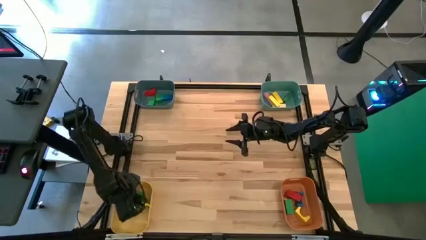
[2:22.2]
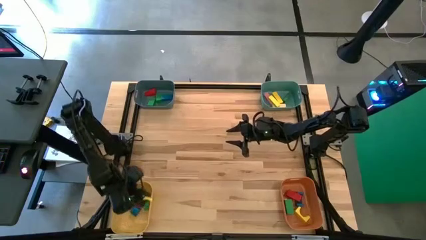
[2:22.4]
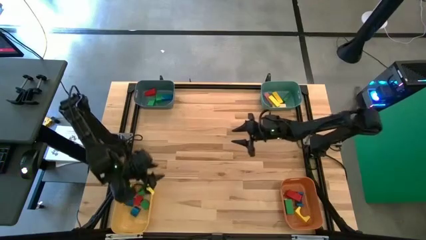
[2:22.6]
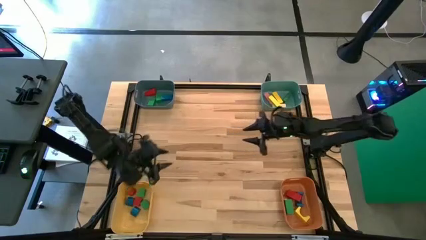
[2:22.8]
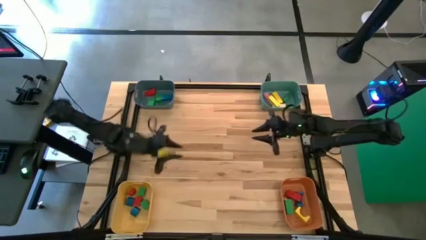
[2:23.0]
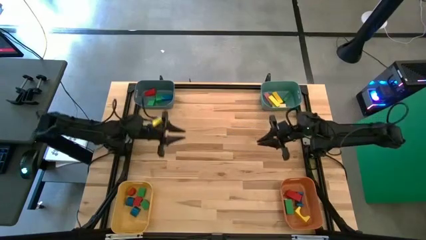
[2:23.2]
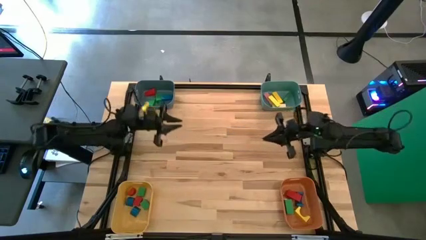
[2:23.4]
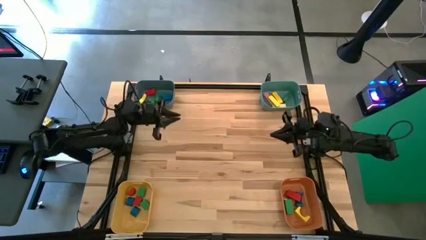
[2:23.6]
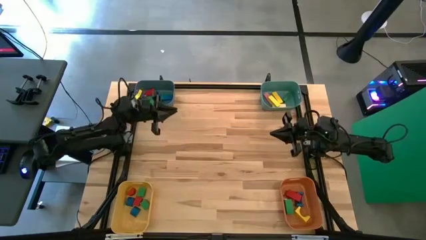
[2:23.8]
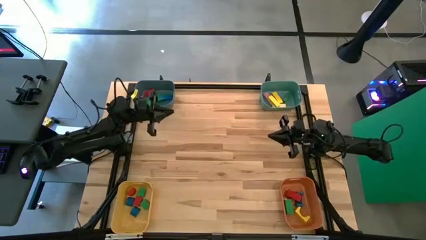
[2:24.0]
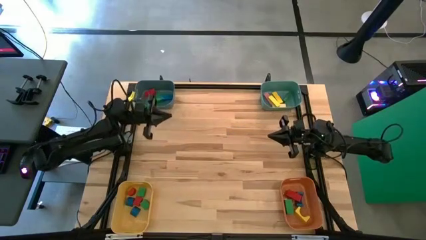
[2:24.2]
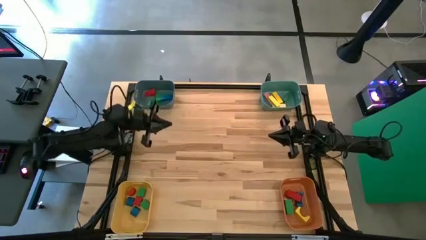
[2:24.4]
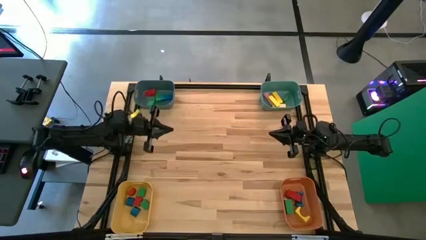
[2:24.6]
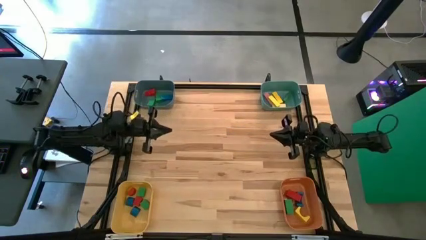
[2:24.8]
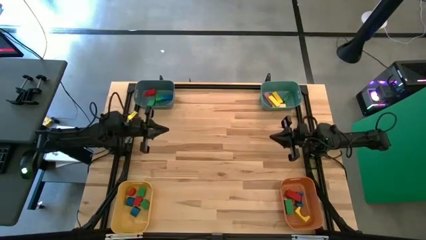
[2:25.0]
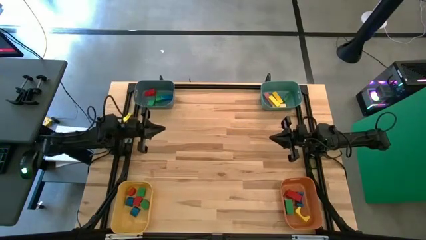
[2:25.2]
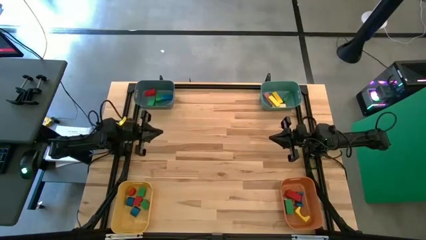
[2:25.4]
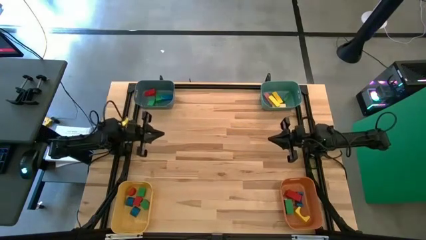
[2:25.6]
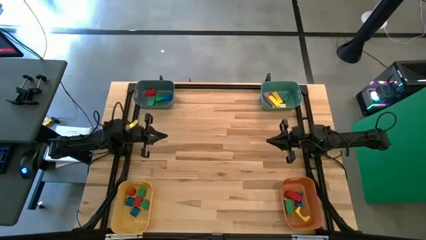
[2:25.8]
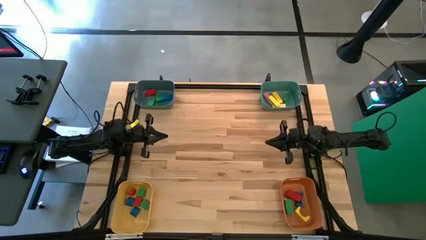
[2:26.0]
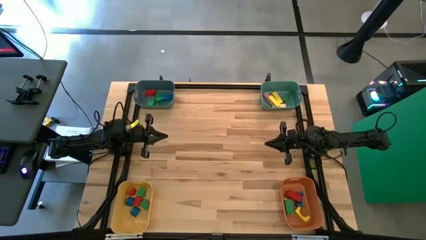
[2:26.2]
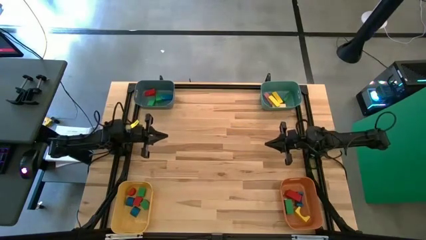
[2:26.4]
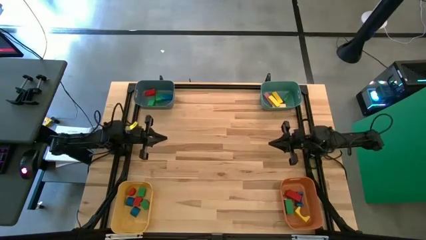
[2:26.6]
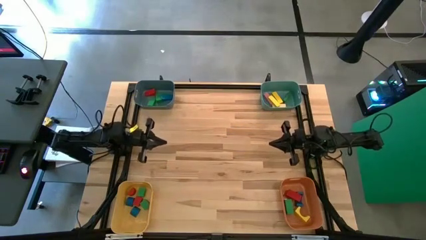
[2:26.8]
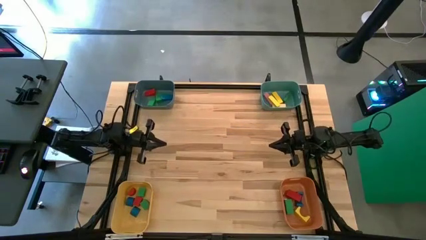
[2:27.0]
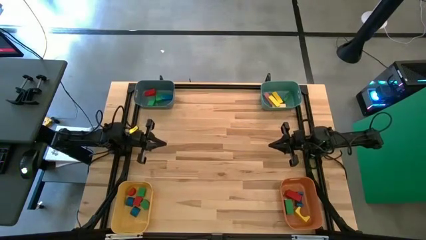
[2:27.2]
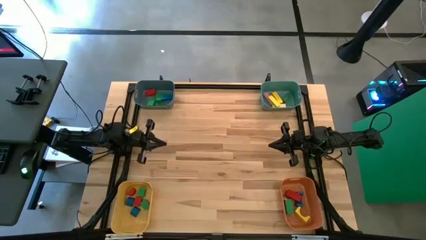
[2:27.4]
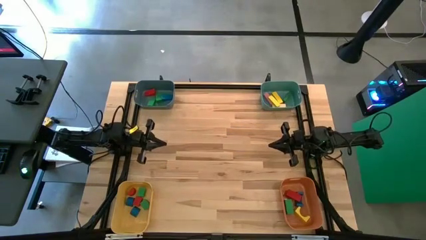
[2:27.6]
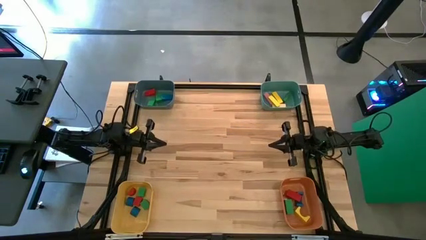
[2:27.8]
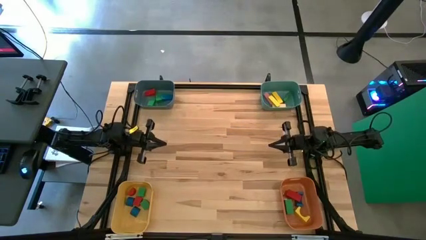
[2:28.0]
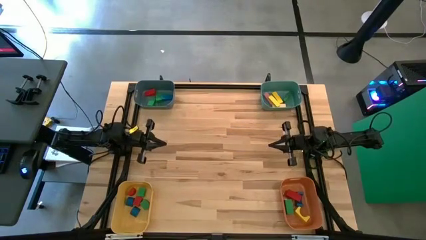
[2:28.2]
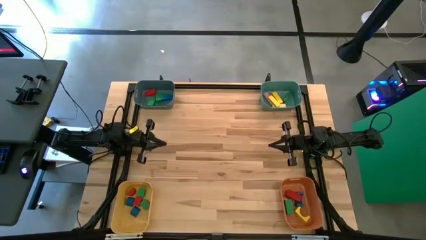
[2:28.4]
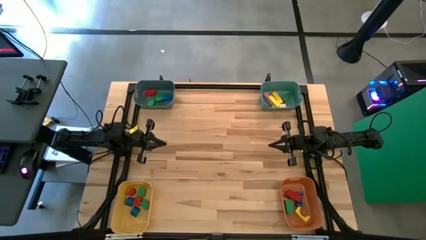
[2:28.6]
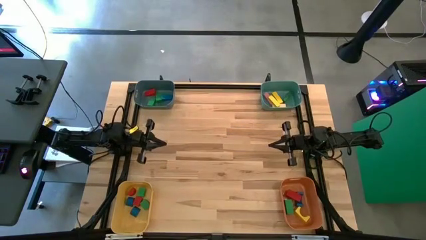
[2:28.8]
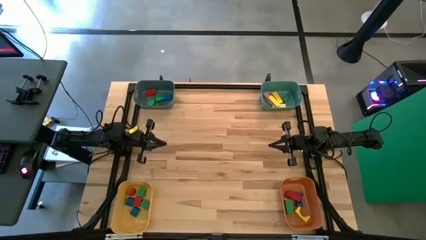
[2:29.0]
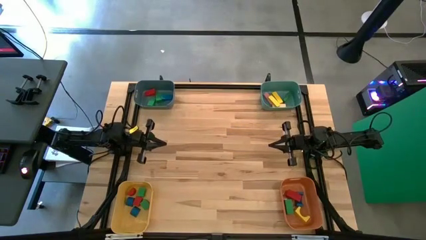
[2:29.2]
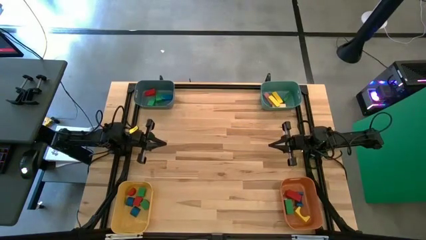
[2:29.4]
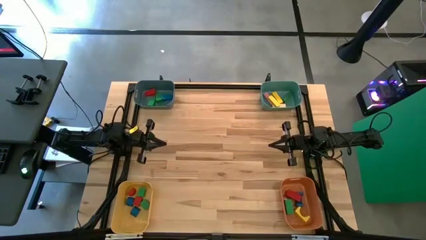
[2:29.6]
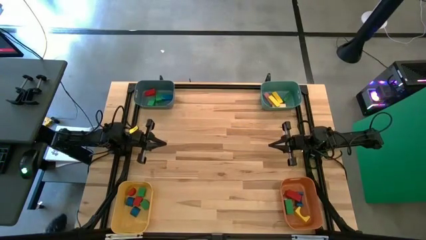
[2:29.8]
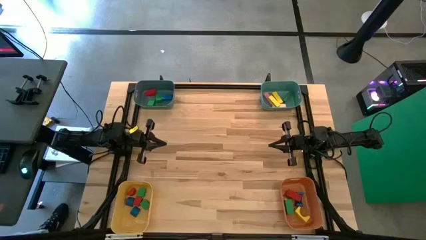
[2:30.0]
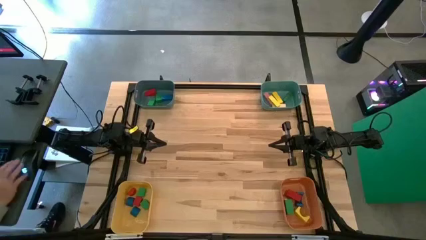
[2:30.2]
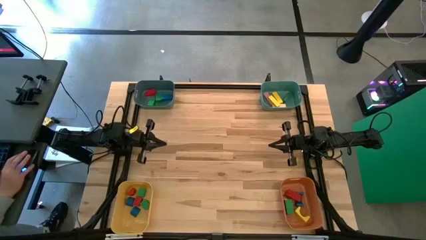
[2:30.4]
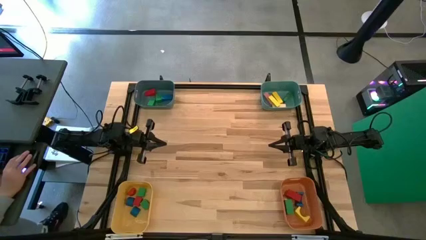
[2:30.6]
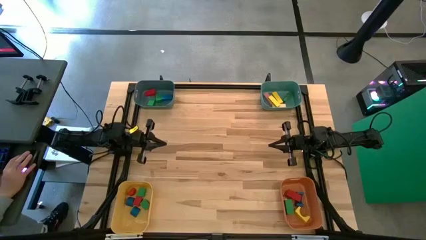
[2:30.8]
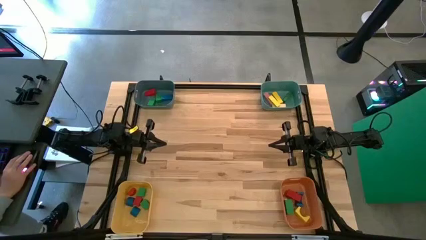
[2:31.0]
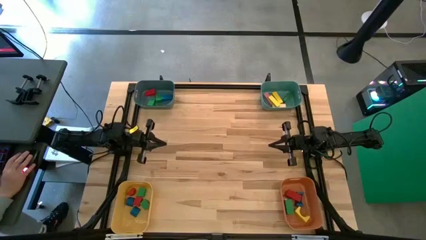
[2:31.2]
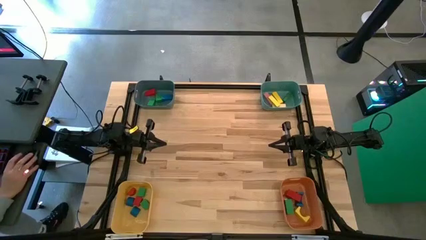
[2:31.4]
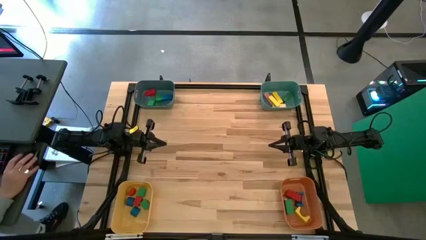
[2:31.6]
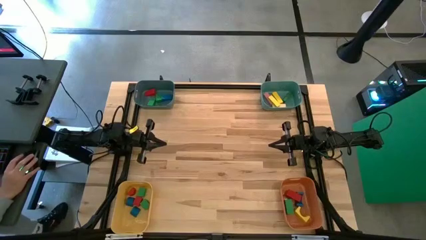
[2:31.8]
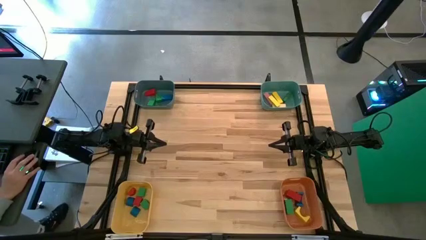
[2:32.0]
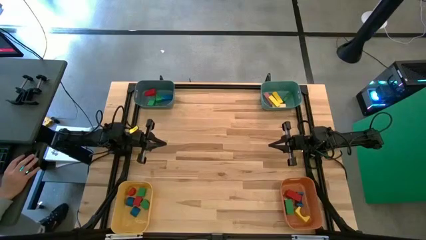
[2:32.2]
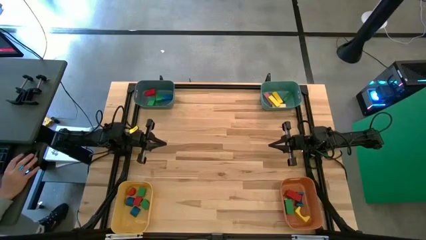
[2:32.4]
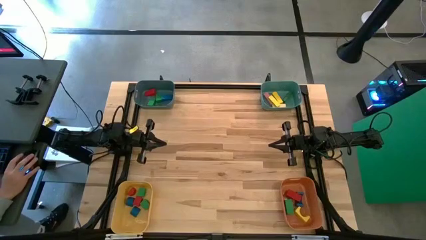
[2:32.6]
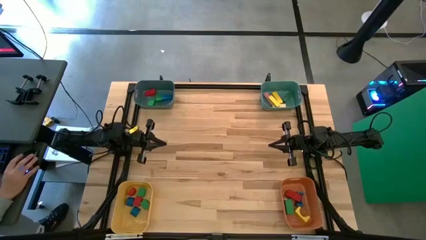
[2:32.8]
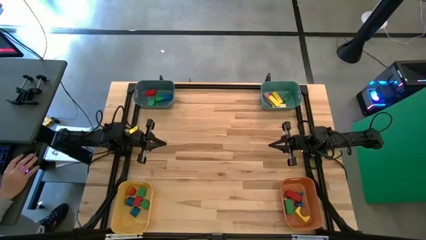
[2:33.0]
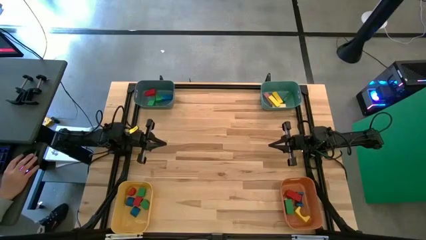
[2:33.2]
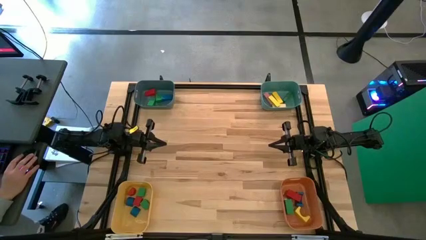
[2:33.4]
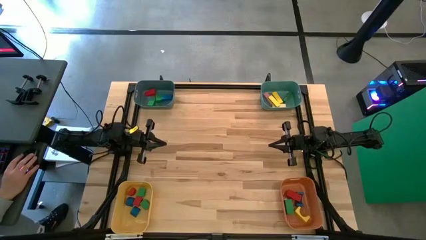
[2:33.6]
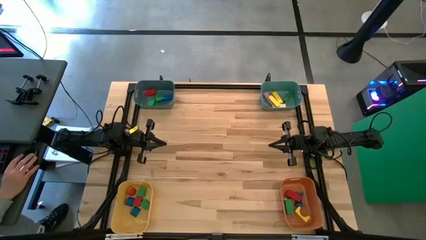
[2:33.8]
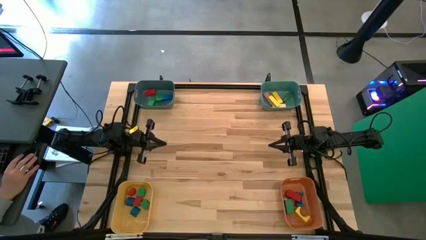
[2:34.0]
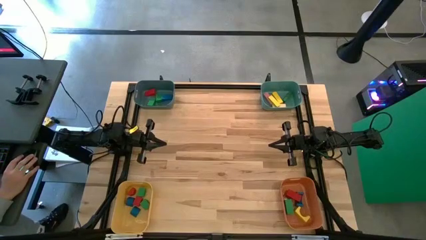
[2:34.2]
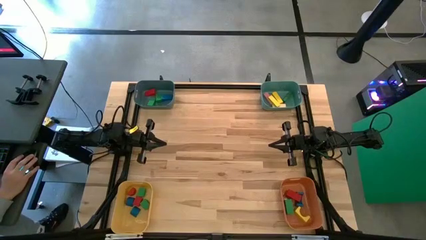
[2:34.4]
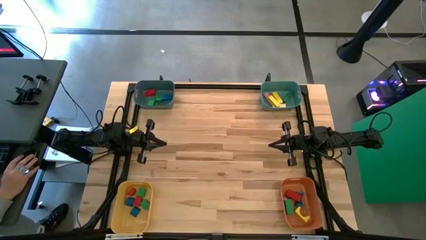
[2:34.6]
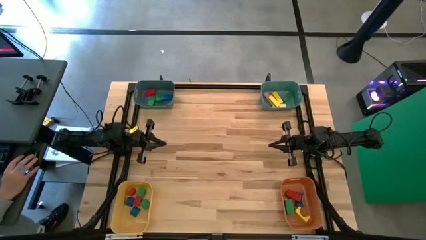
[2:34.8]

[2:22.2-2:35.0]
Task: Sort blocks by size
Return to Home Position

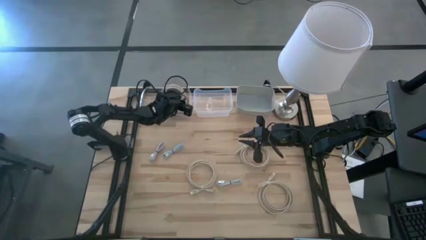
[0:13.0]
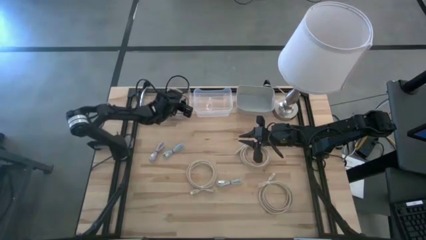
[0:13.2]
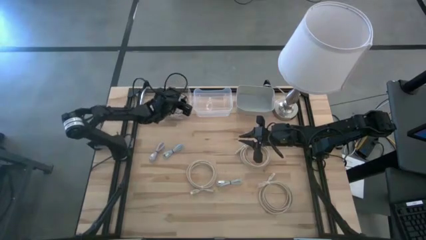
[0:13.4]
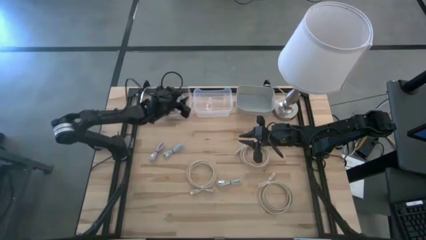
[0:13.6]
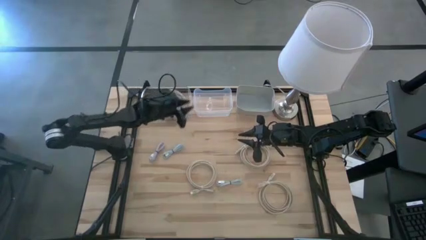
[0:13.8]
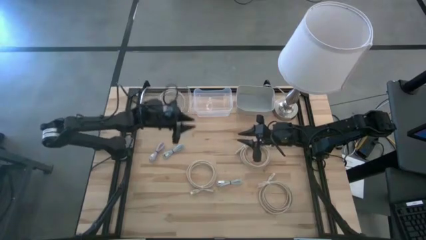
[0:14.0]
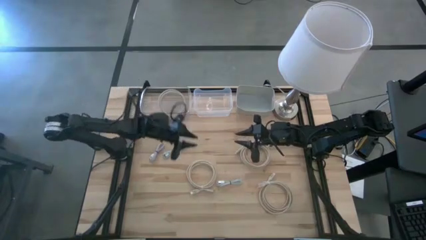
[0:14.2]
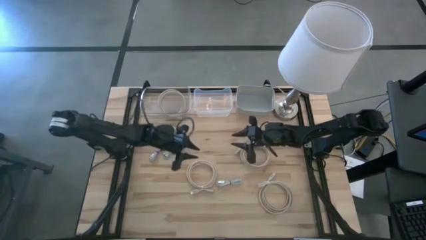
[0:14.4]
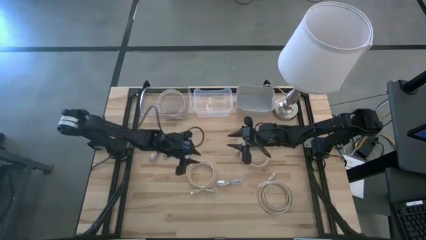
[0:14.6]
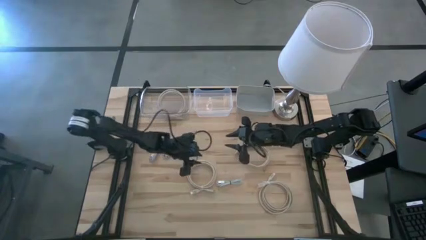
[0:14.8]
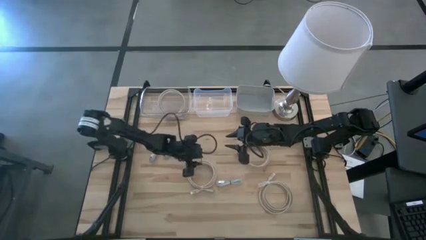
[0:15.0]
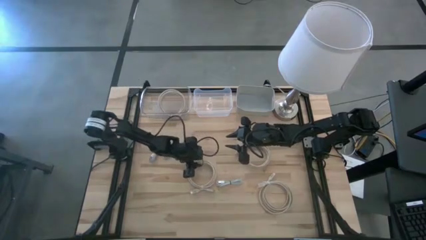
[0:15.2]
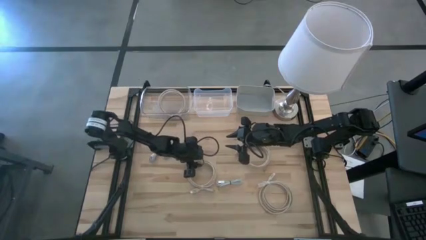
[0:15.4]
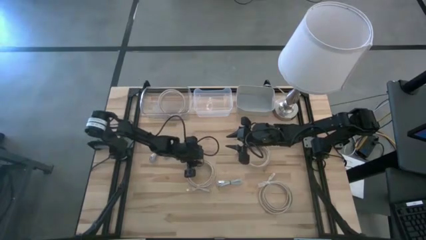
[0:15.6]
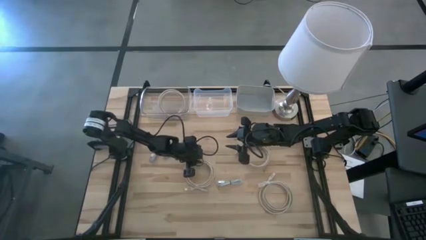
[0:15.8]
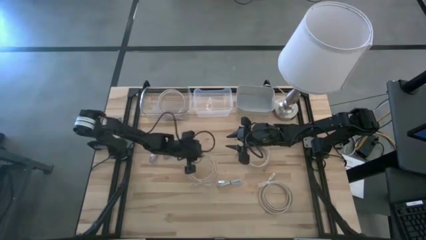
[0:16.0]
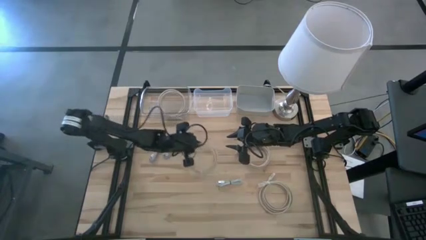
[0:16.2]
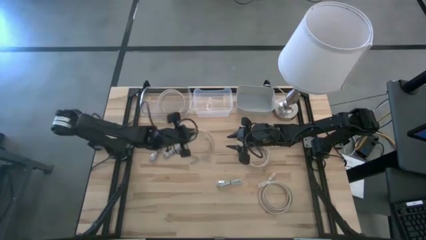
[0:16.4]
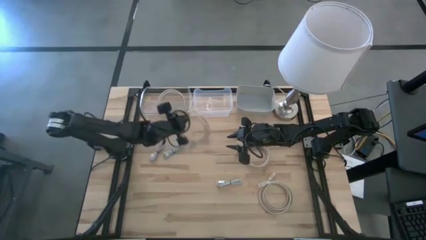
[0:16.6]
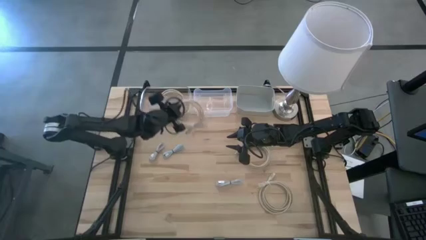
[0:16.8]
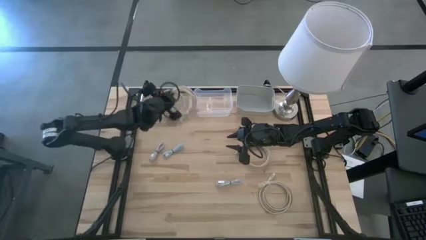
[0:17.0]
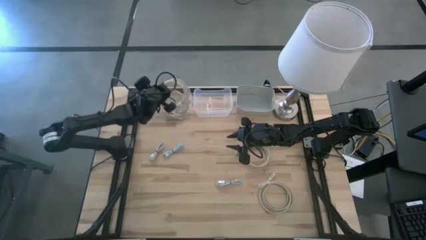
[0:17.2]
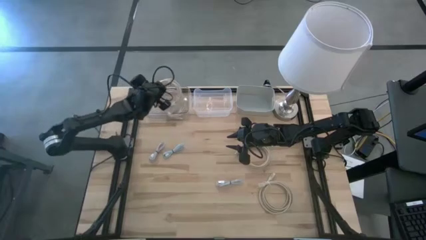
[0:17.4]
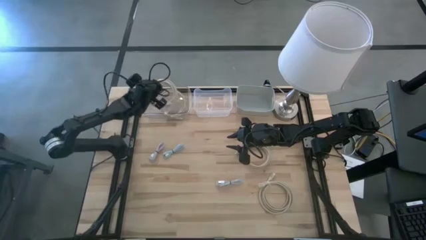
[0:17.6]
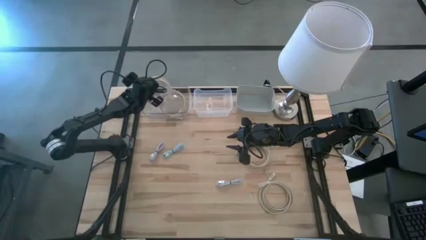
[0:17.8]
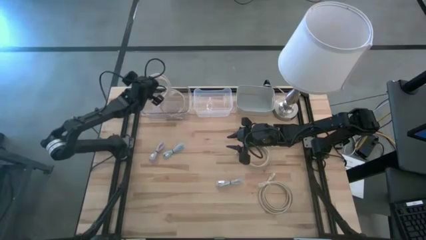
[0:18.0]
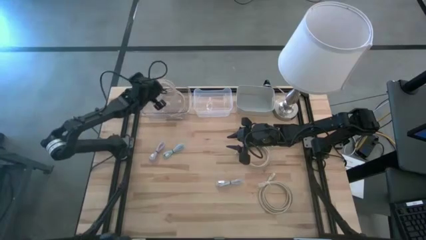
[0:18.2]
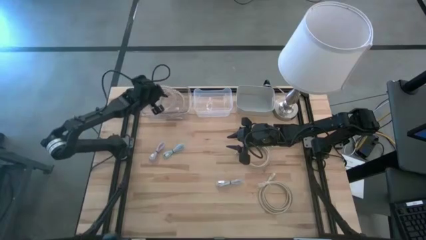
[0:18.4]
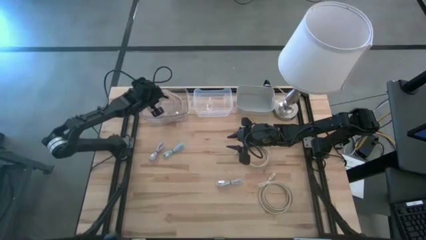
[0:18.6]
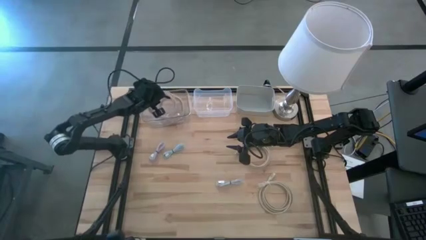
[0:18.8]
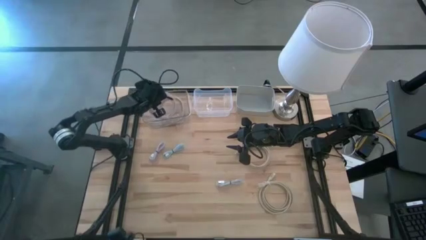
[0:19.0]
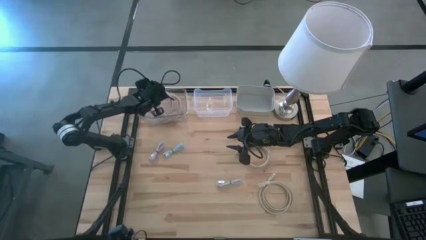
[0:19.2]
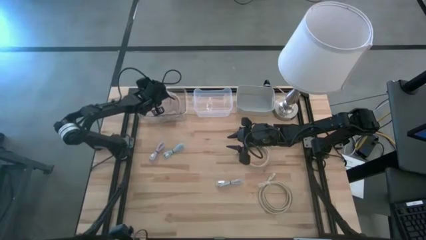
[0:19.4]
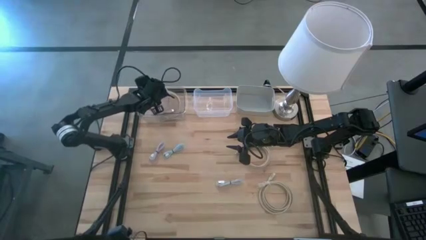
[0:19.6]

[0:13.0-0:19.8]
Task: Pick & Place USB Port
Put the brown HDMI cable into the left transparent bin
